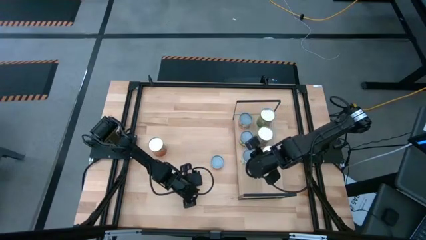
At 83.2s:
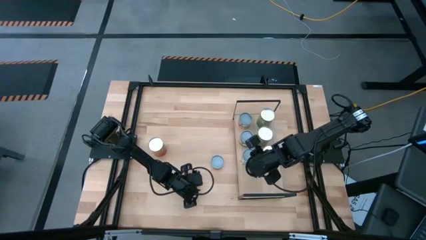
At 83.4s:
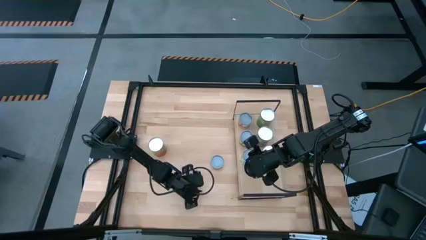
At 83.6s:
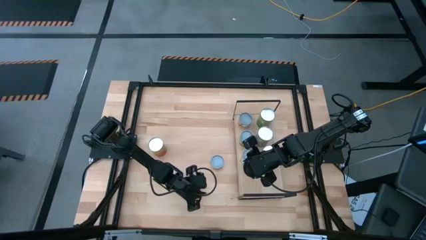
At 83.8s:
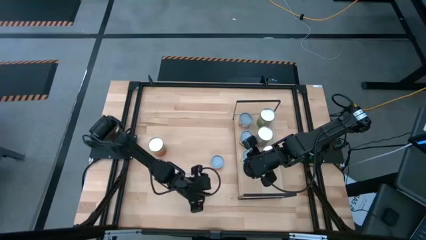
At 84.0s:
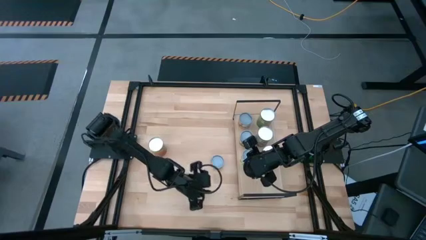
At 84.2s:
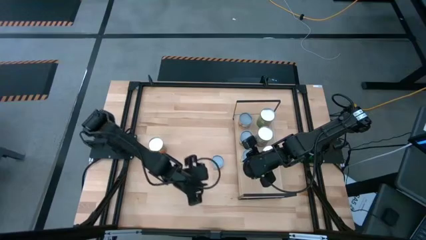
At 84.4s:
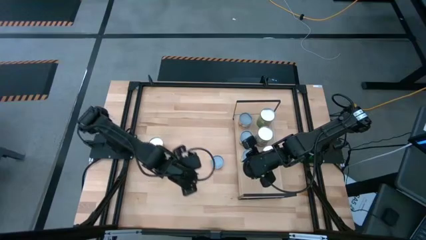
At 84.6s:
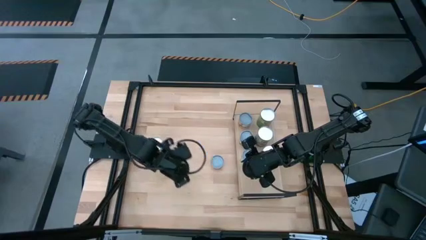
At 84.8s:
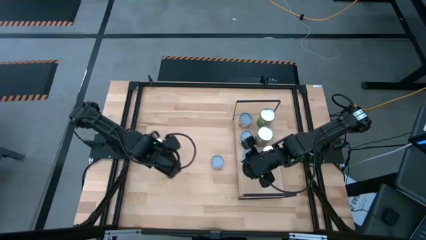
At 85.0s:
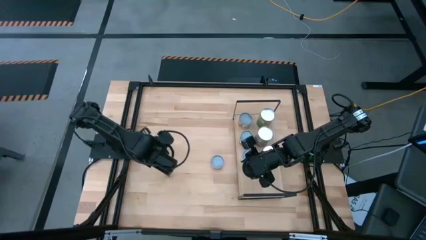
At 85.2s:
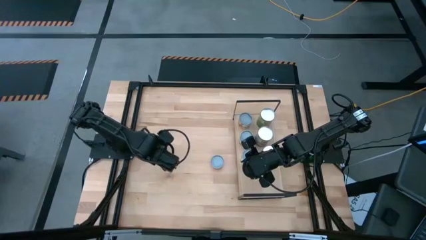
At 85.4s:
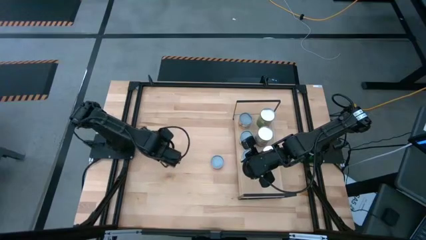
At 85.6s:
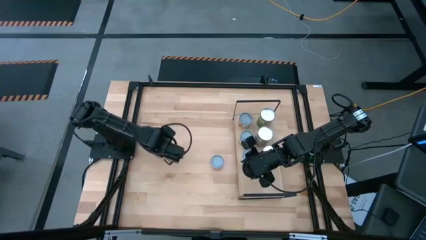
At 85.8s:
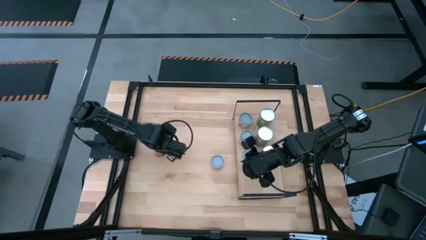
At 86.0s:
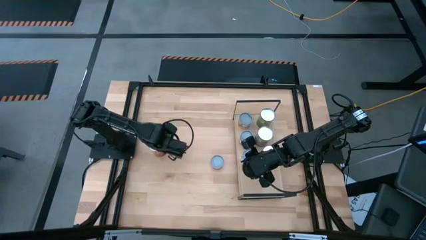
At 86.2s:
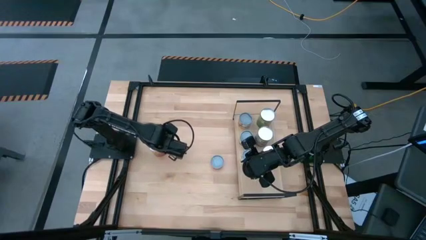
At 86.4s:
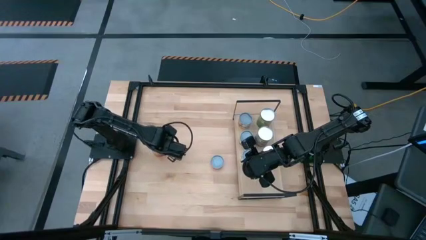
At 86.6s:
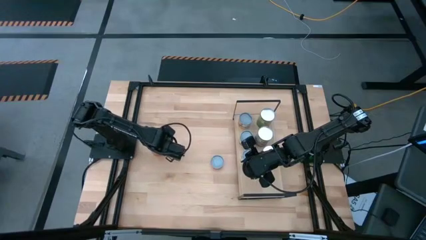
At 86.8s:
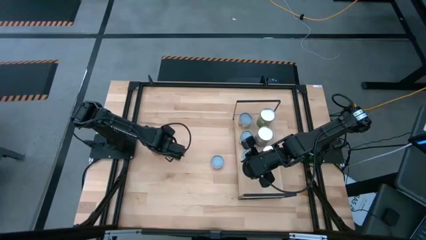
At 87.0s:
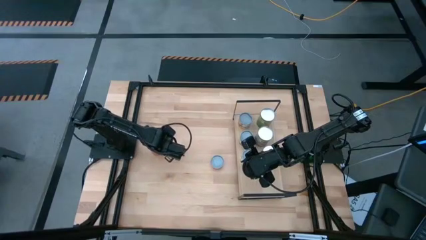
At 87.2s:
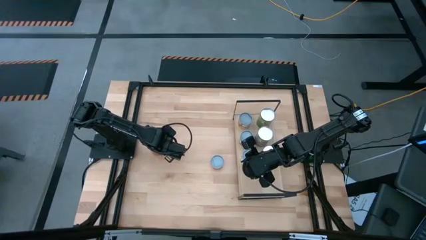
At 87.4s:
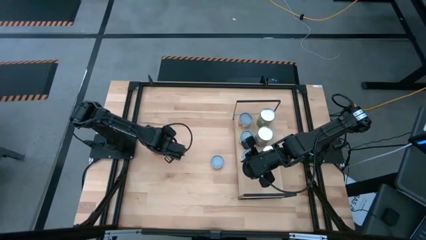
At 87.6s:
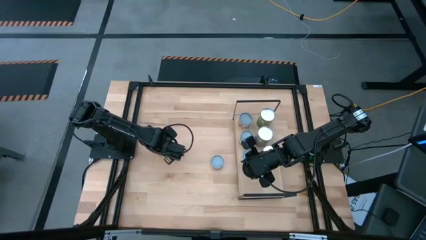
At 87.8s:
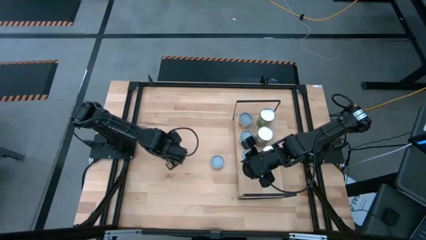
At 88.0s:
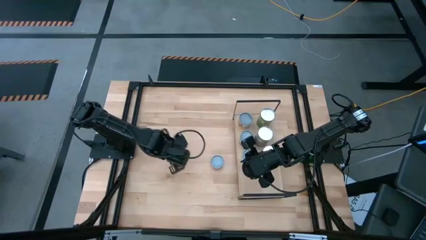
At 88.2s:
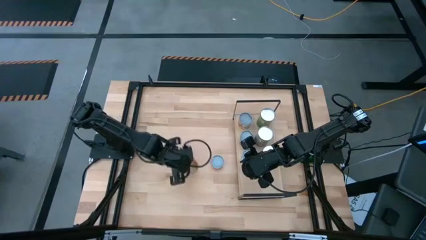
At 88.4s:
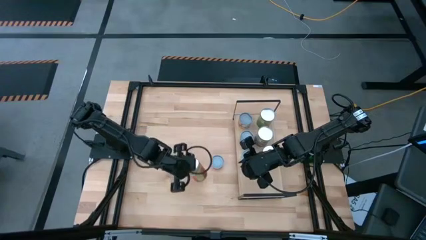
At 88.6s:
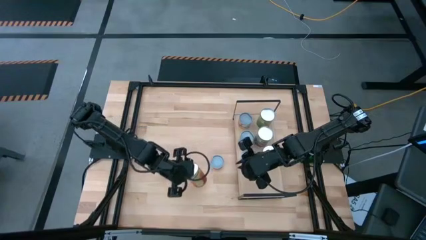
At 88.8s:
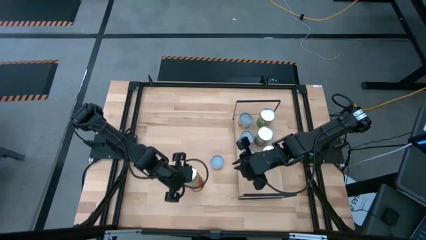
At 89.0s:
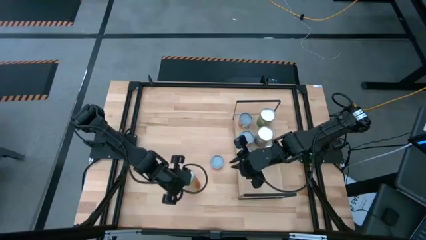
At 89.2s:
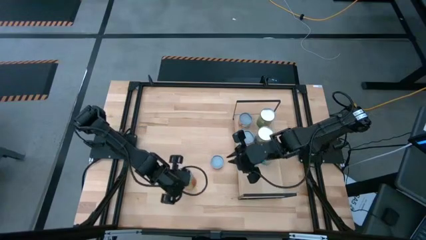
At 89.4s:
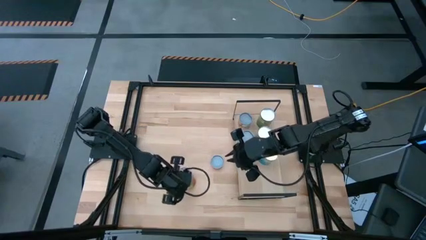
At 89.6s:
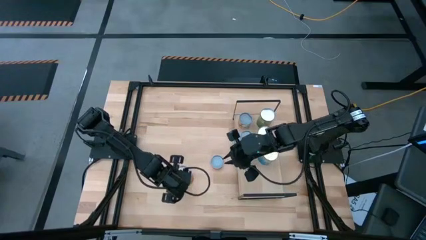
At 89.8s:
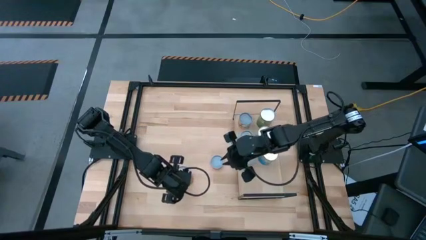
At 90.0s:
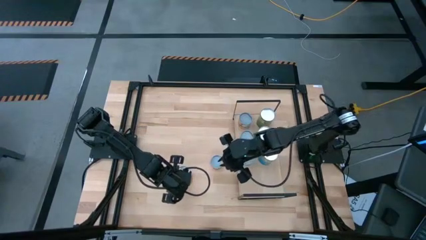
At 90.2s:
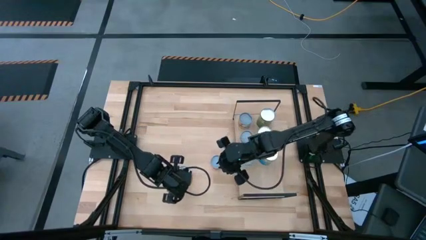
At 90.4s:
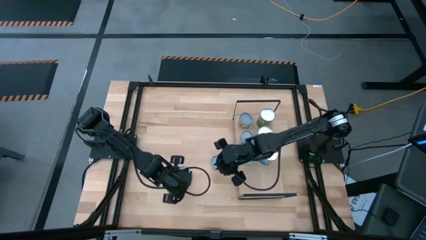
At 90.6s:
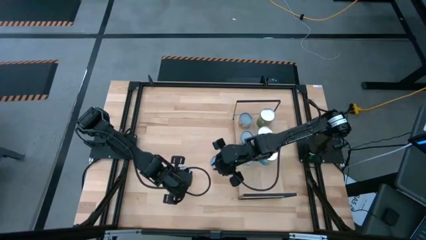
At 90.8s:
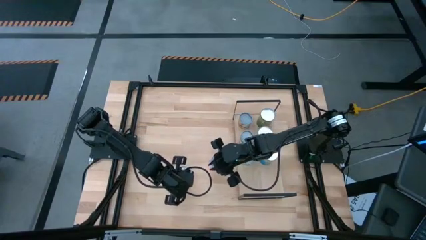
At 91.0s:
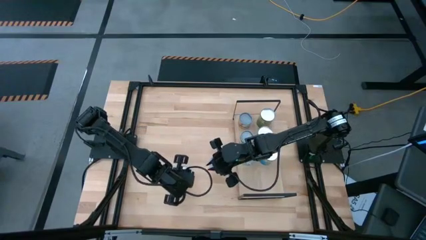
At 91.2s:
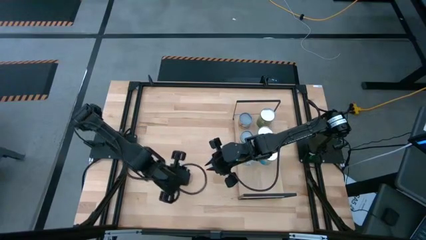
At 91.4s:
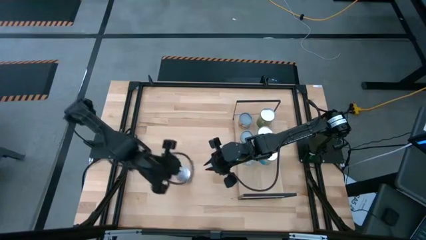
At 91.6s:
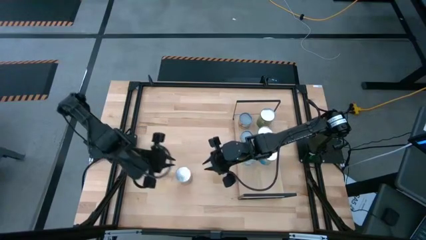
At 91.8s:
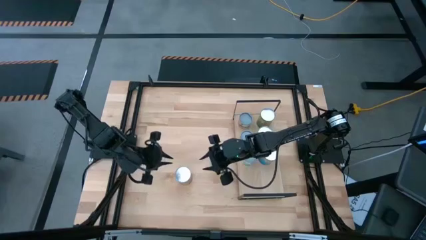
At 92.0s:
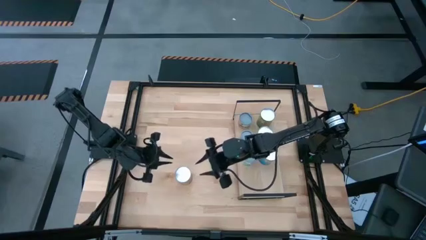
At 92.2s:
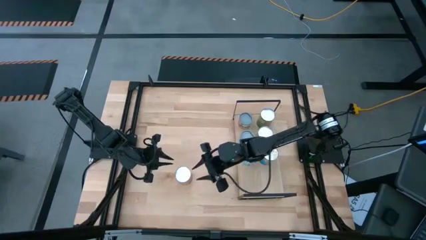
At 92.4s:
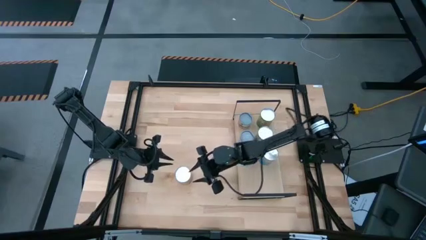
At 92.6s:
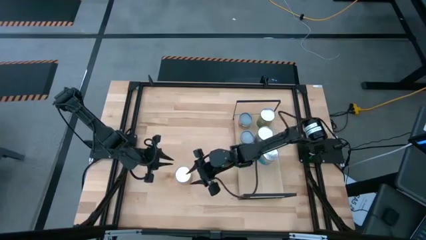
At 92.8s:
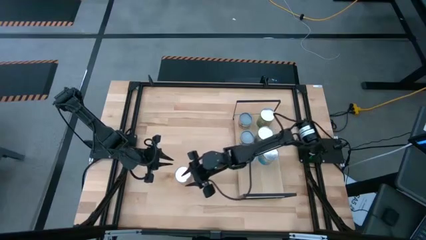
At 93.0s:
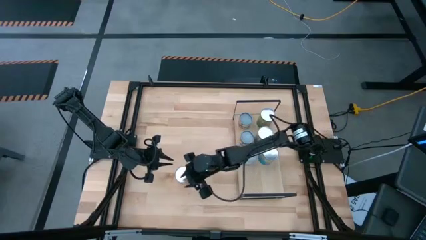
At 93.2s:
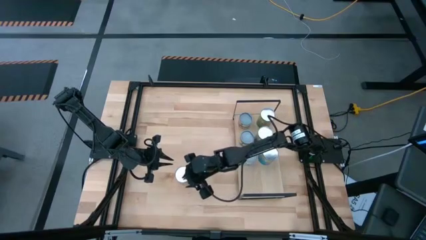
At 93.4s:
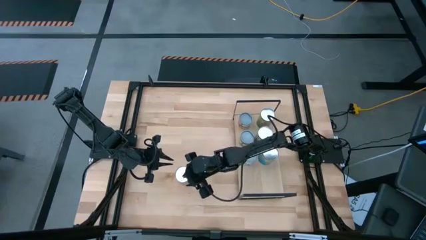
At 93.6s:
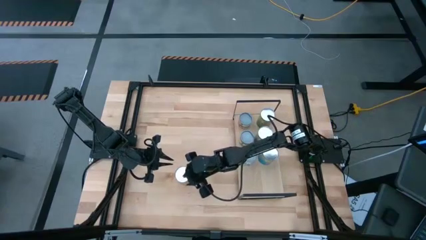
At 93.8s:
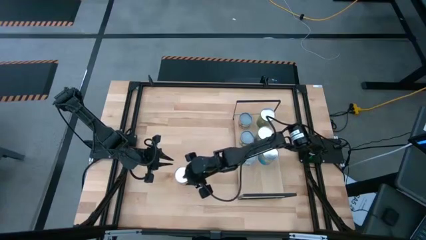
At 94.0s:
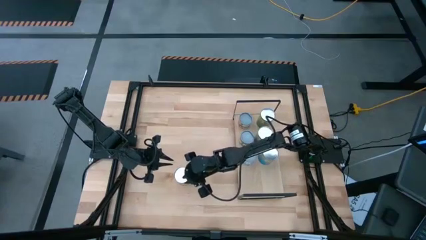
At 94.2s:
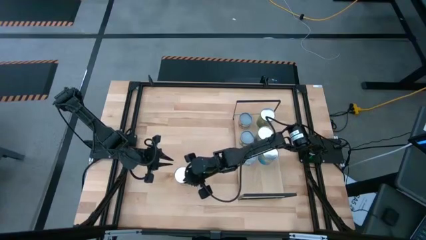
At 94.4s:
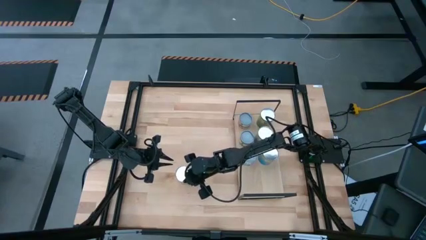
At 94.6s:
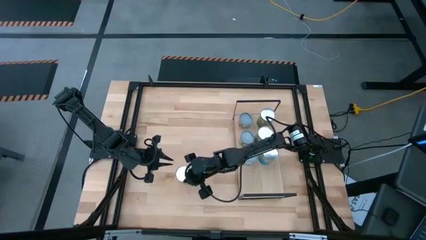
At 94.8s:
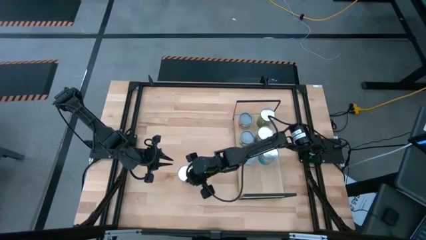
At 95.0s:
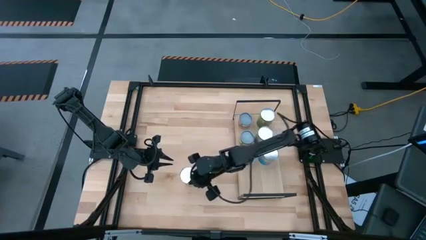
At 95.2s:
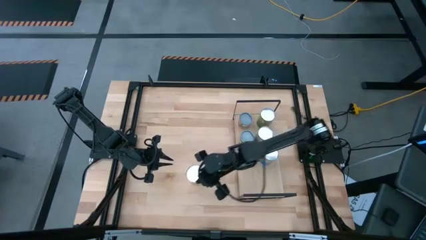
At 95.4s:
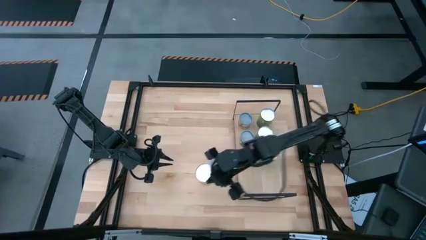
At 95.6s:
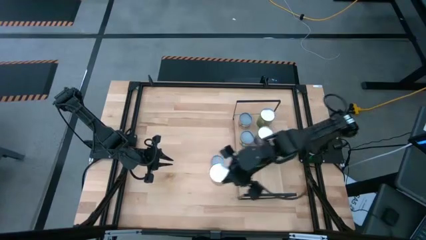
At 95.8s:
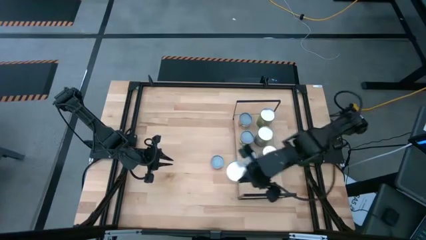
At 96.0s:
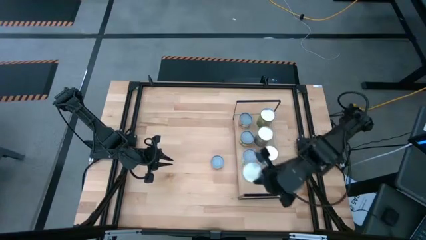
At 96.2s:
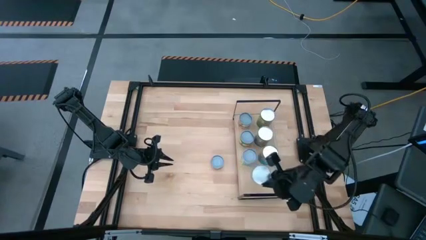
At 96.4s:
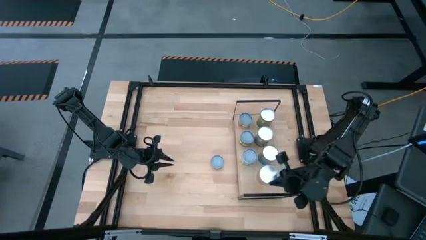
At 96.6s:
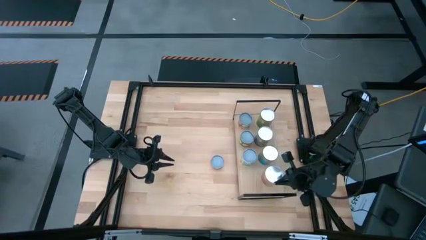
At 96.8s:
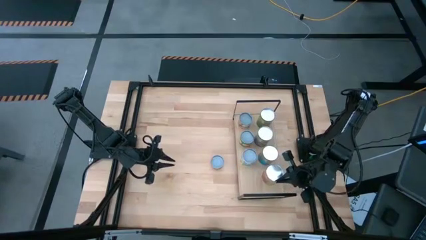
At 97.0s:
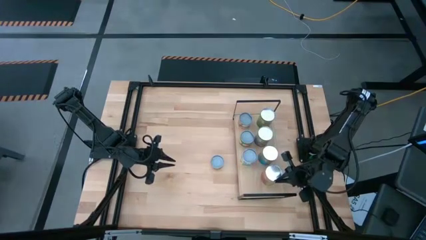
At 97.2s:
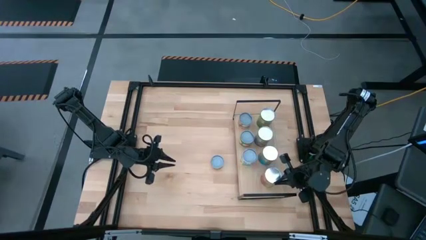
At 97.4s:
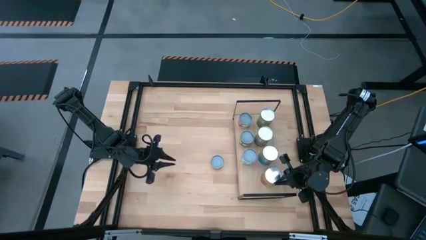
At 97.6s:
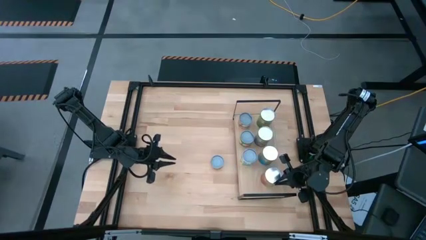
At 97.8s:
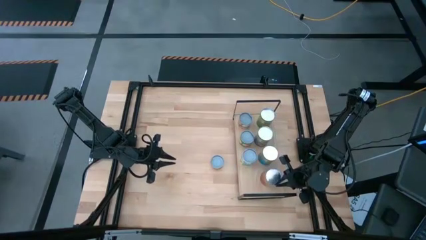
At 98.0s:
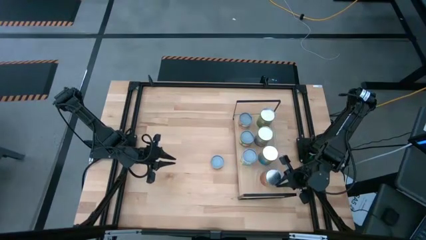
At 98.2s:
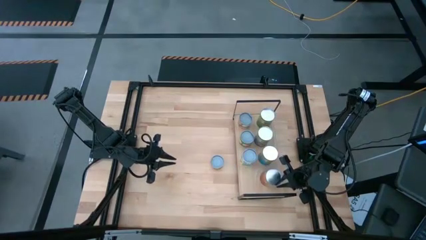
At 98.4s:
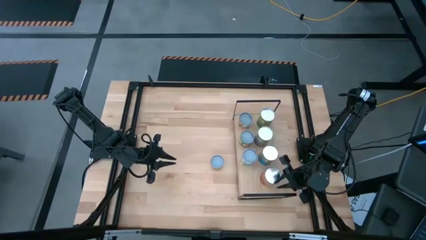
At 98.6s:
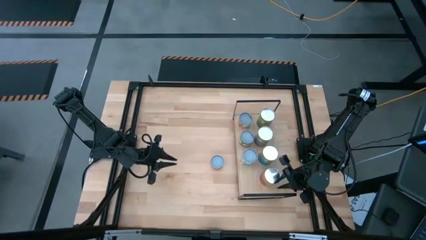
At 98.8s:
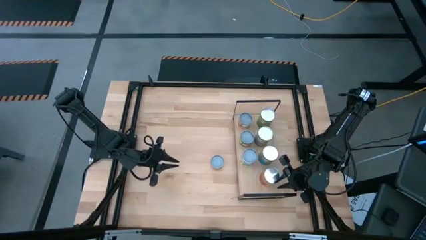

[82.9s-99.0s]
Task: Pick and place cans onto a shelf
Put the canned pineapple on the shelf
